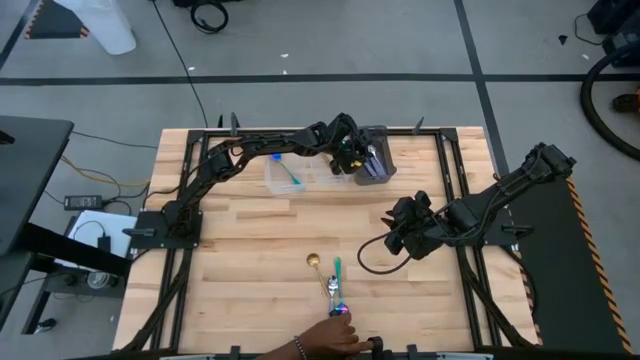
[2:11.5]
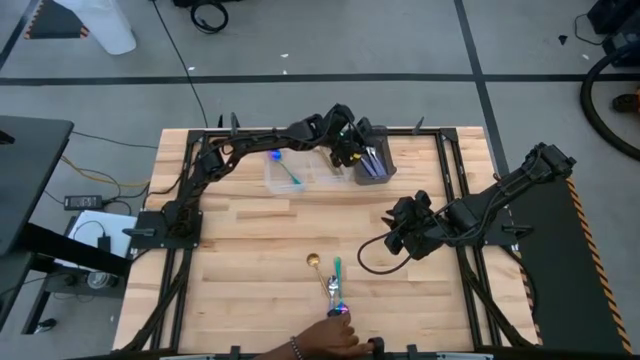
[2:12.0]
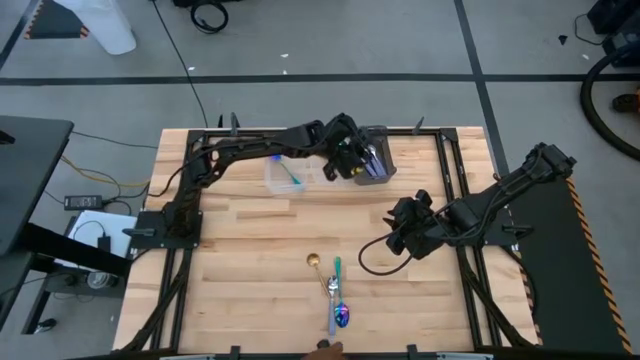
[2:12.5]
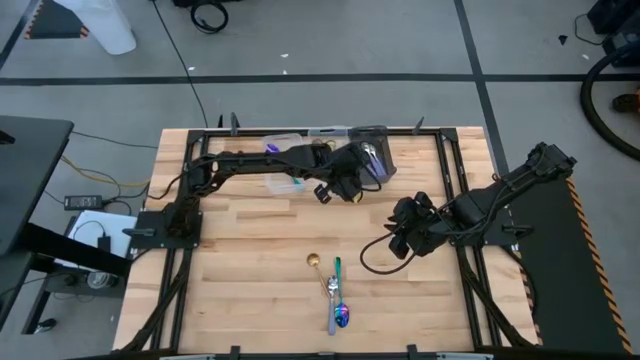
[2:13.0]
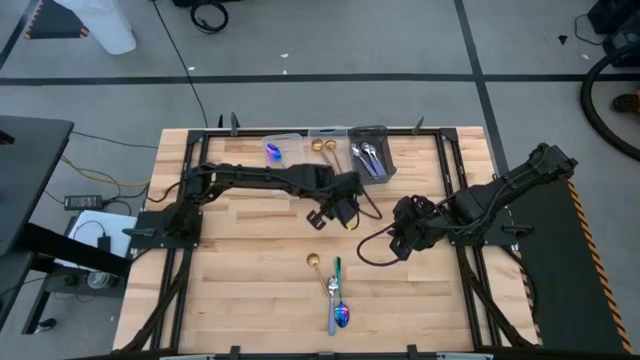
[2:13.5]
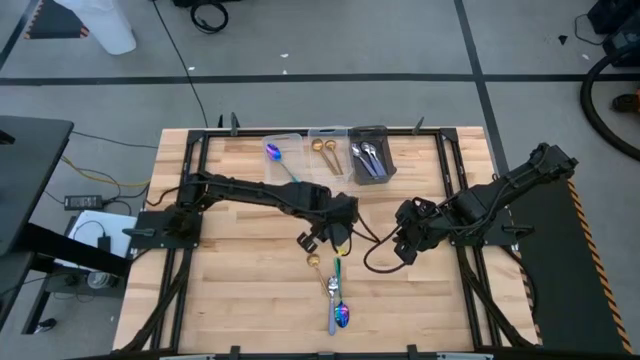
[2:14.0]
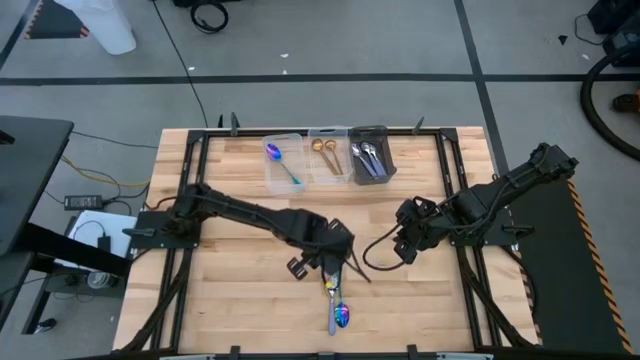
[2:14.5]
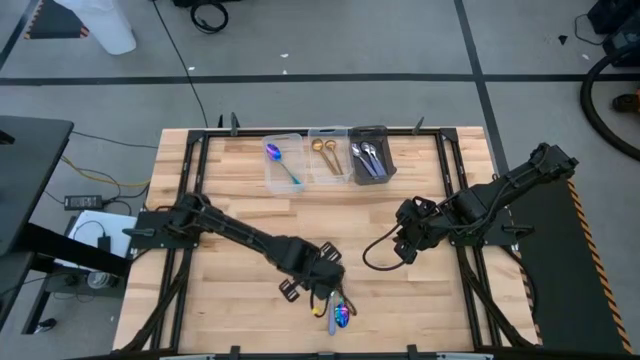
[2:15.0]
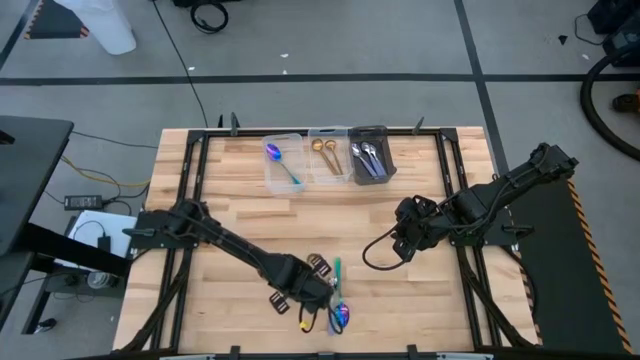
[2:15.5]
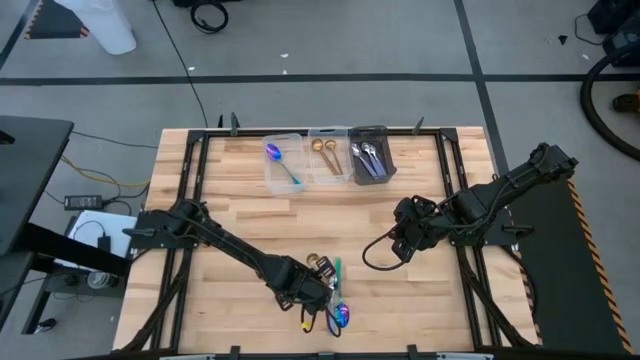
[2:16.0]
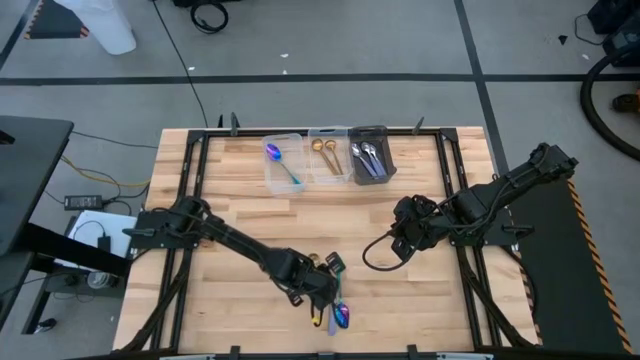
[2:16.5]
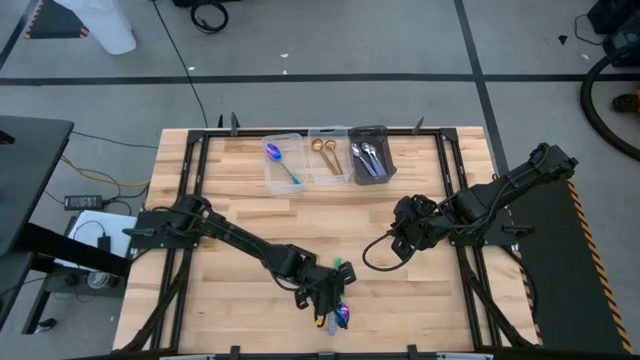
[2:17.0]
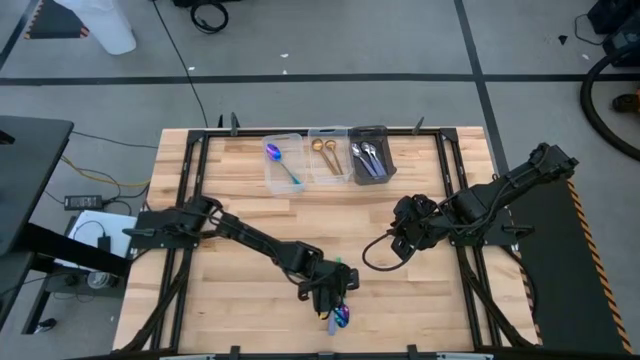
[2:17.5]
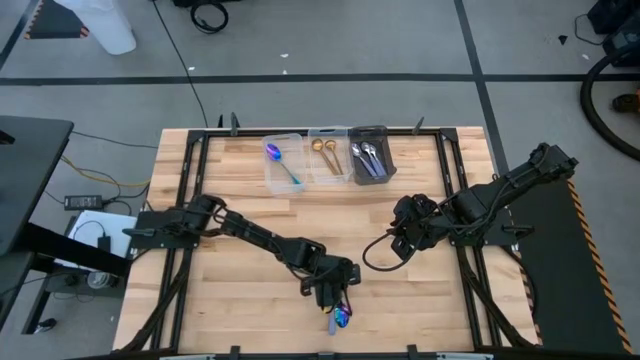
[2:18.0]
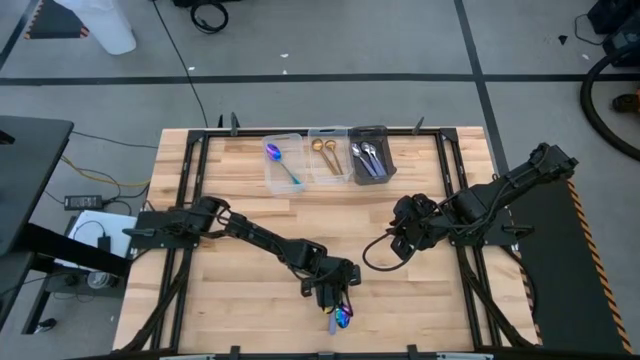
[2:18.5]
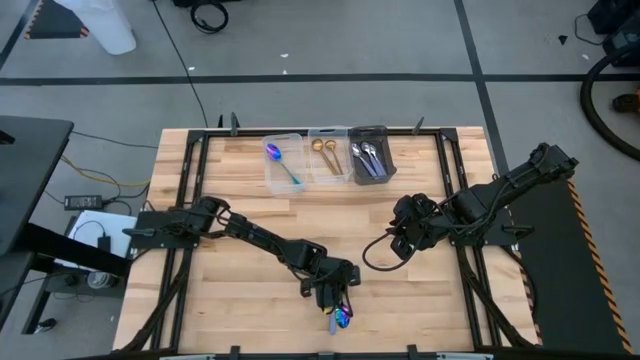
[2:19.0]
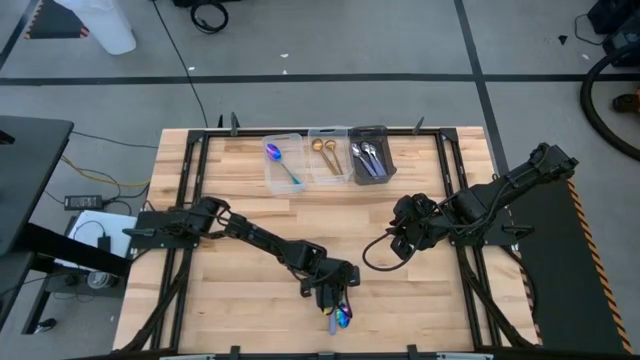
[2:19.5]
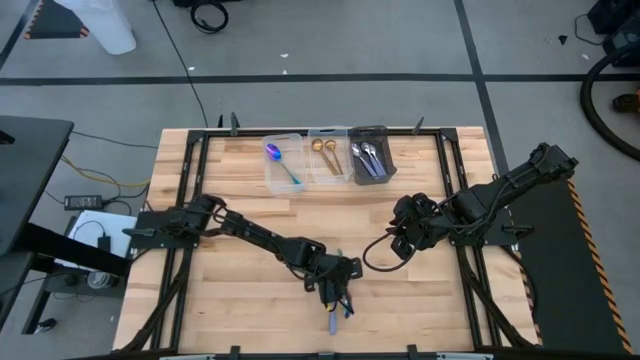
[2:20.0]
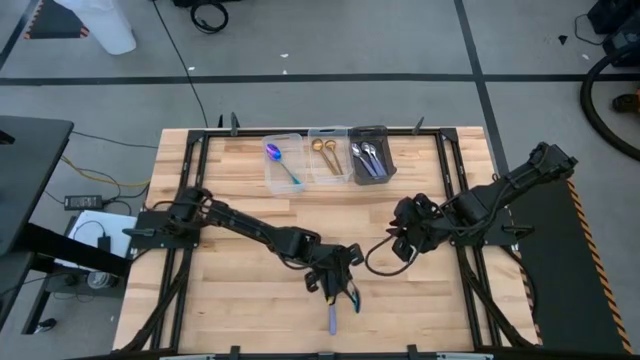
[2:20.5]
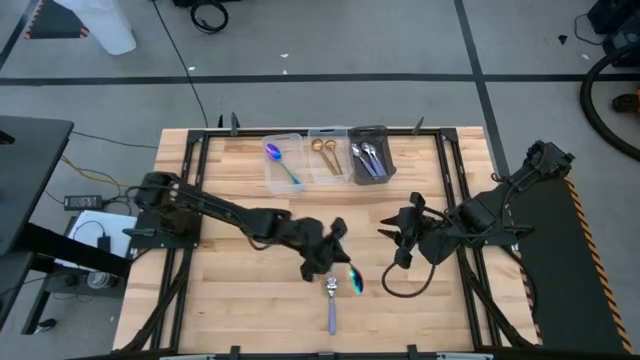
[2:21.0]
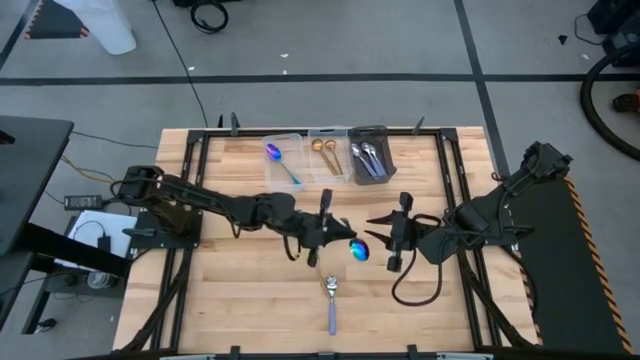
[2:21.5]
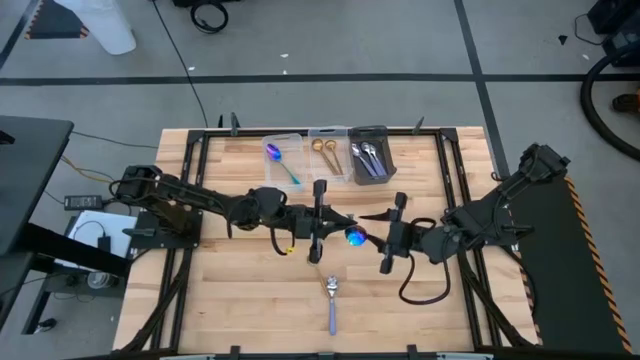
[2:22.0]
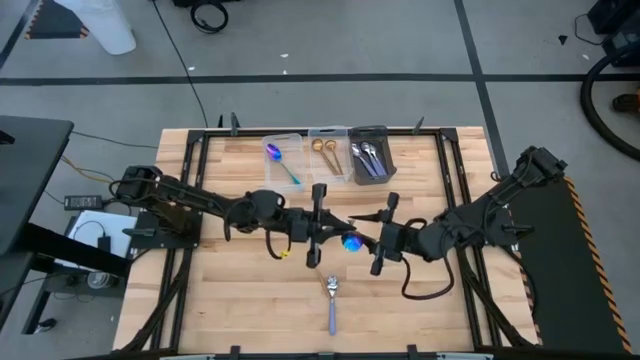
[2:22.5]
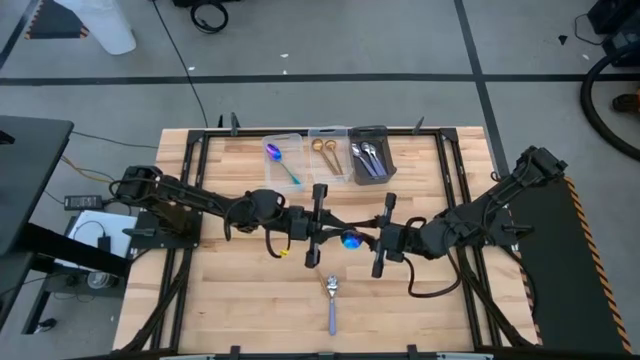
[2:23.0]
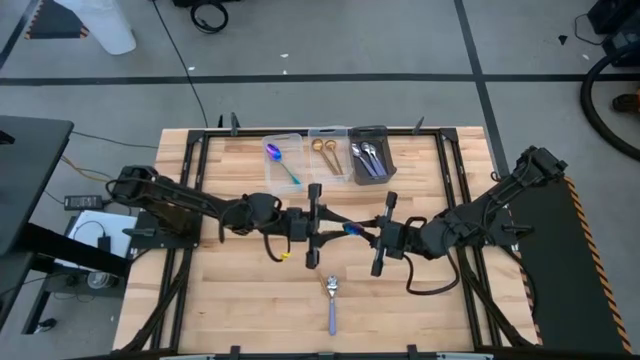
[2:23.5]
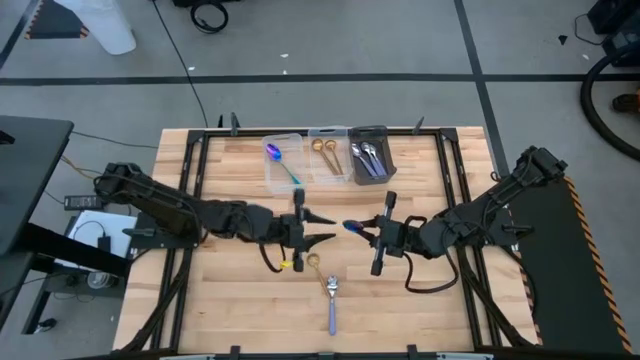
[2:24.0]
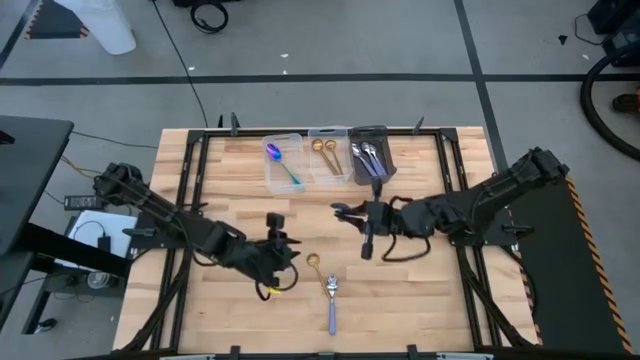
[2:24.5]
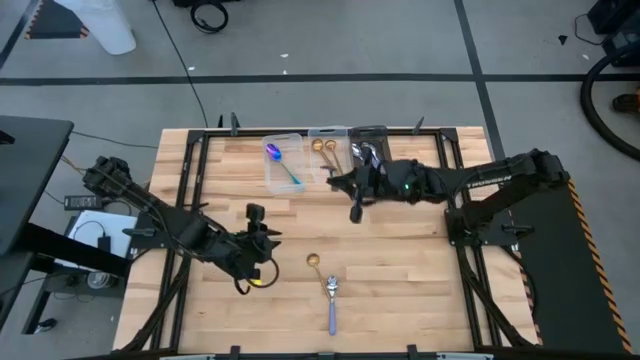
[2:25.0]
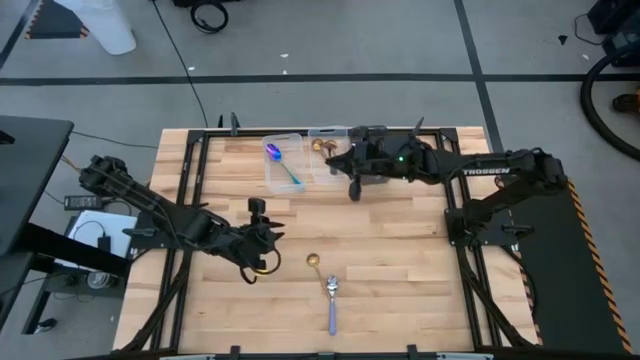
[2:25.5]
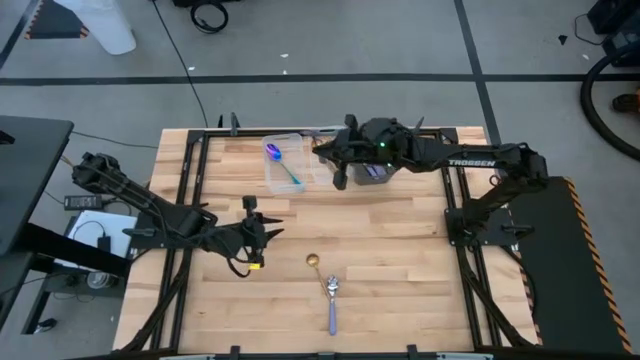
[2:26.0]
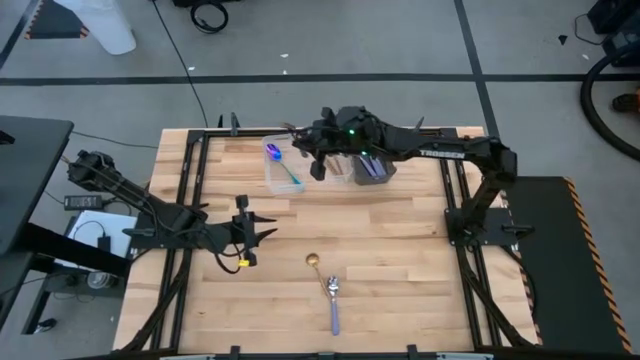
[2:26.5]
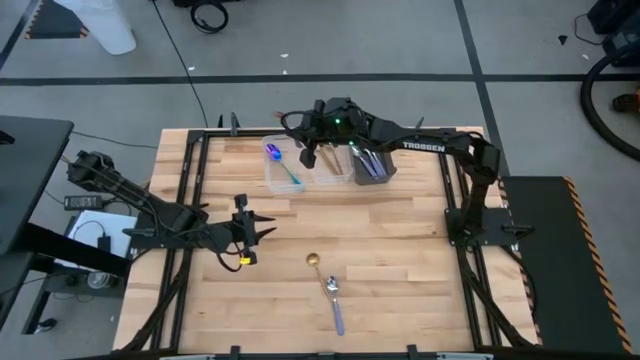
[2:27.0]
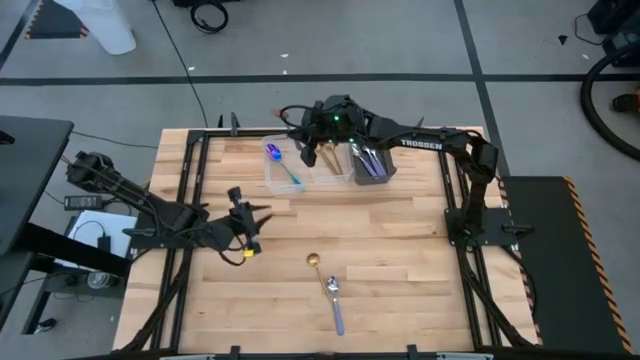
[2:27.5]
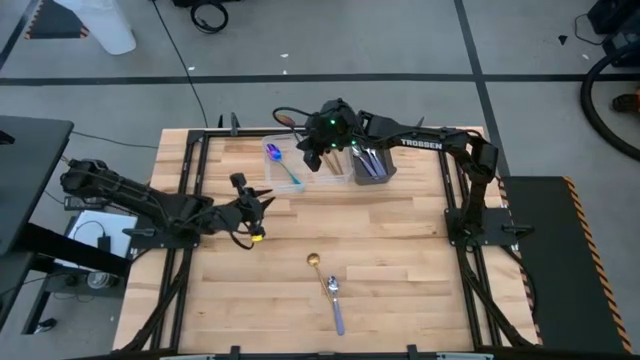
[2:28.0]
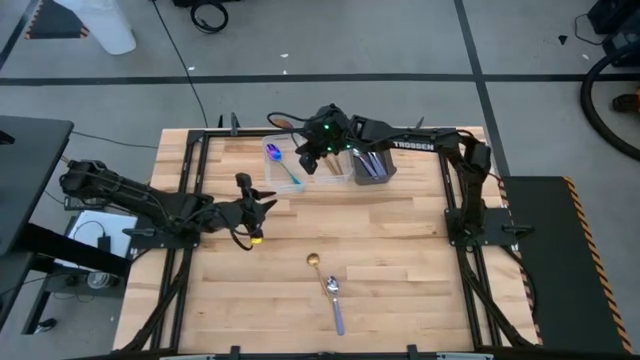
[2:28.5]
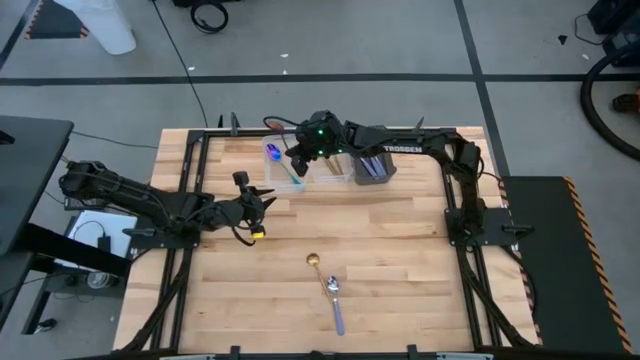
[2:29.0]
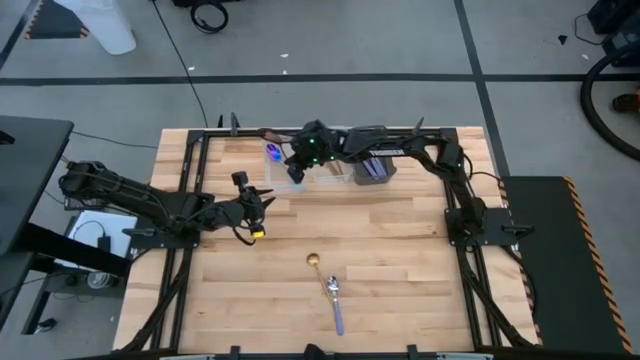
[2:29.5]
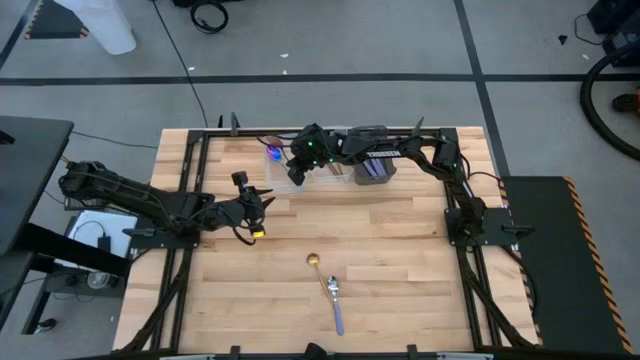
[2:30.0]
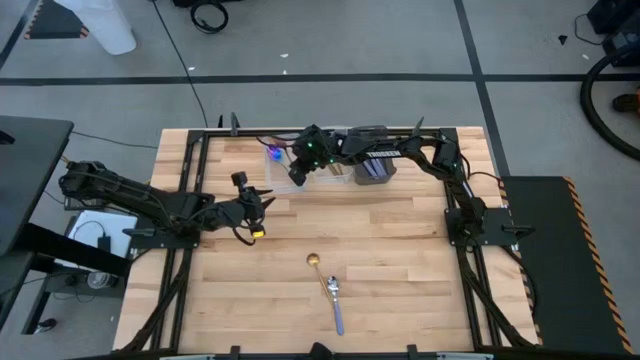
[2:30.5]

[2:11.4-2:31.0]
Task: Sort silverware by color (type)
Put the blue spoon into the left transparent bin

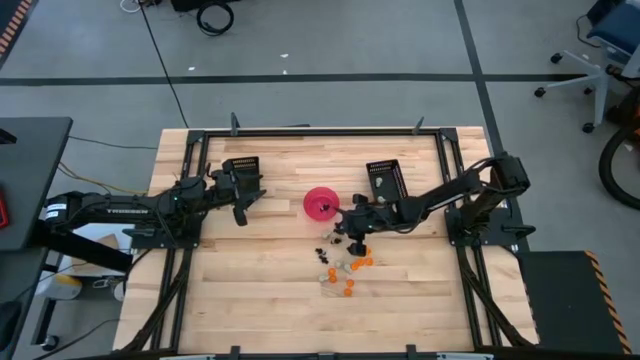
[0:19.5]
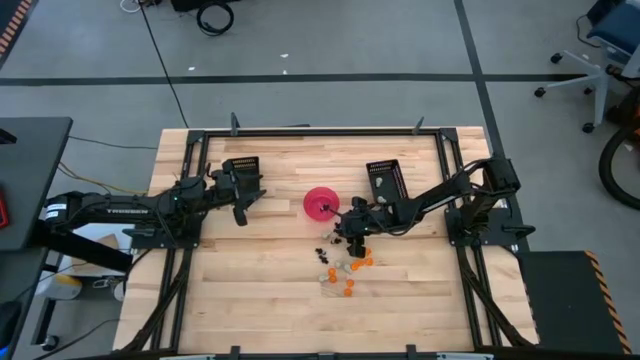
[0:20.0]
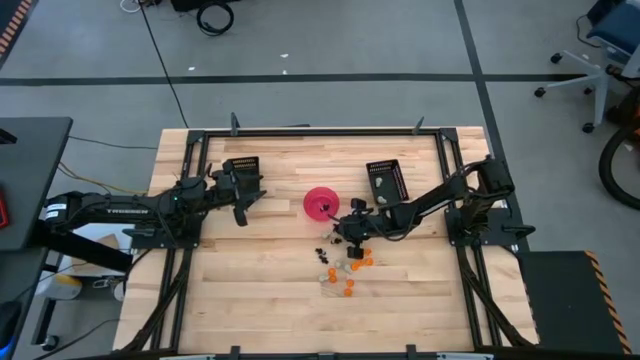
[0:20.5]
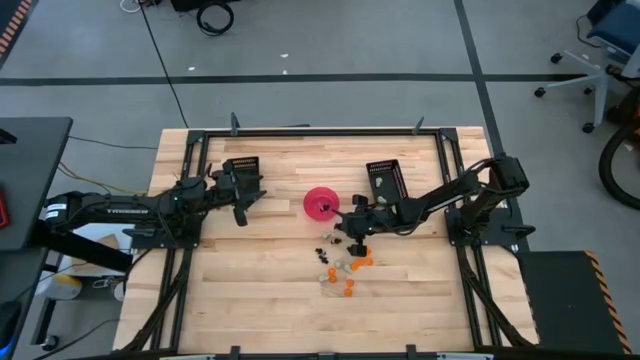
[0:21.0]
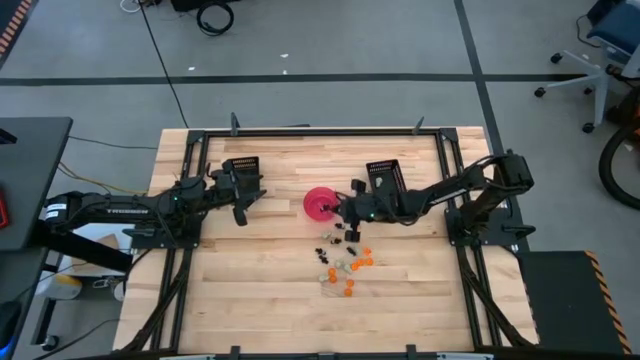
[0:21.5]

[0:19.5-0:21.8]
Task: Sort Halloween decoration
Put the black skeleton toy into the pink bin

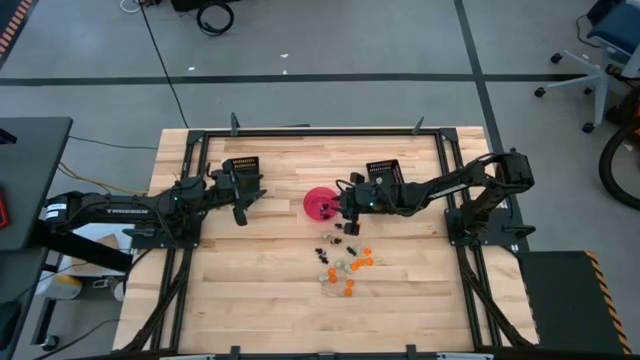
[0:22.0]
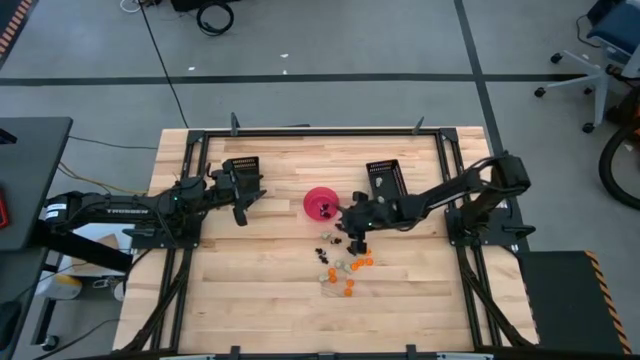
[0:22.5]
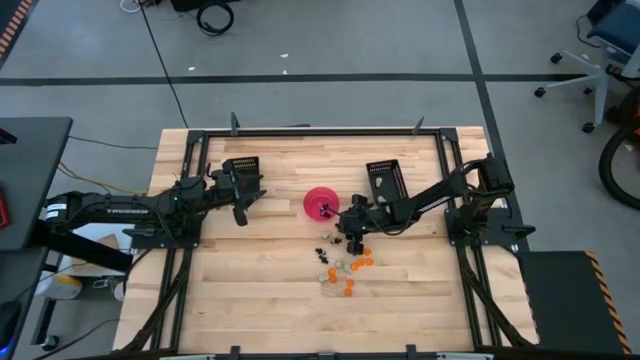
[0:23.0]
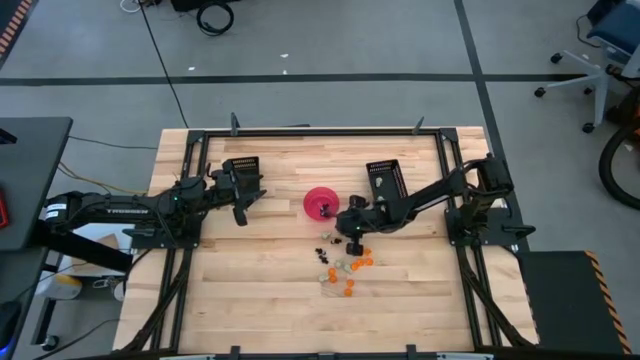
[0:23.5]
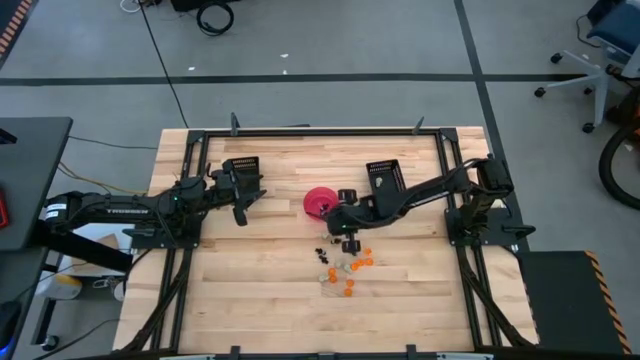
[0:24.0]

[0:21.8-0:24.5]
Put the black skeleton toy into the pink bin
